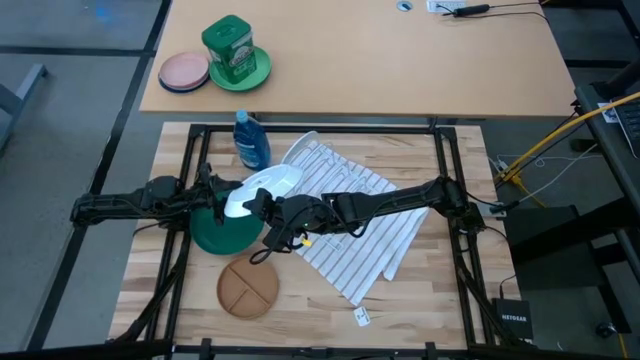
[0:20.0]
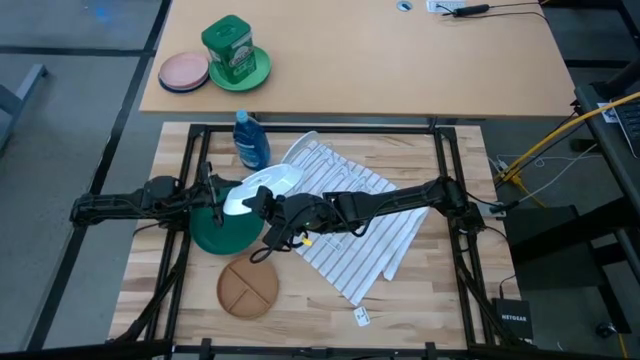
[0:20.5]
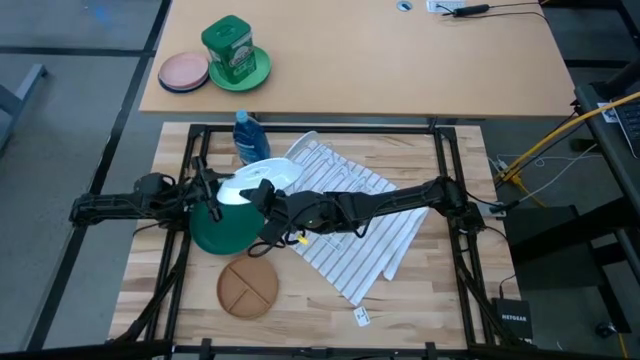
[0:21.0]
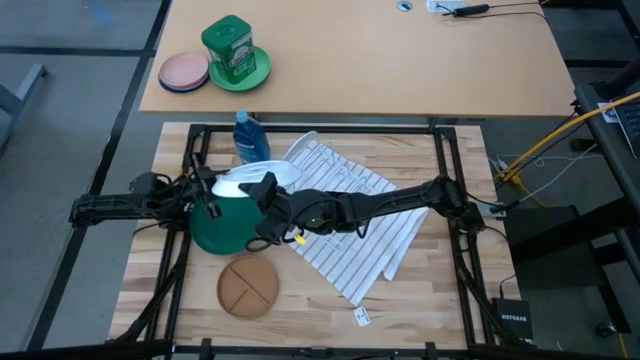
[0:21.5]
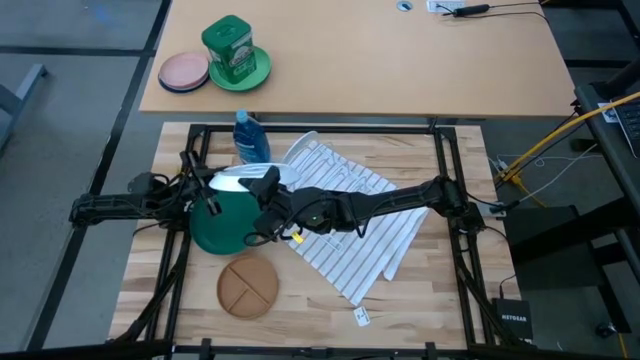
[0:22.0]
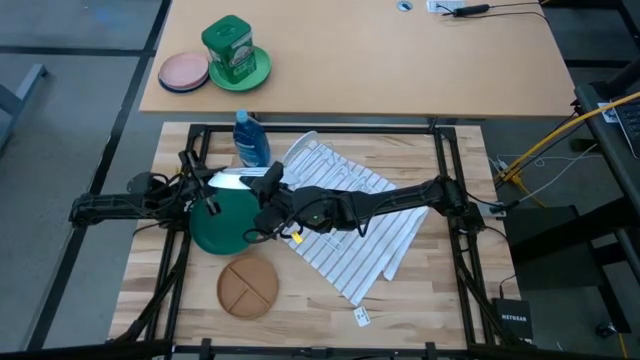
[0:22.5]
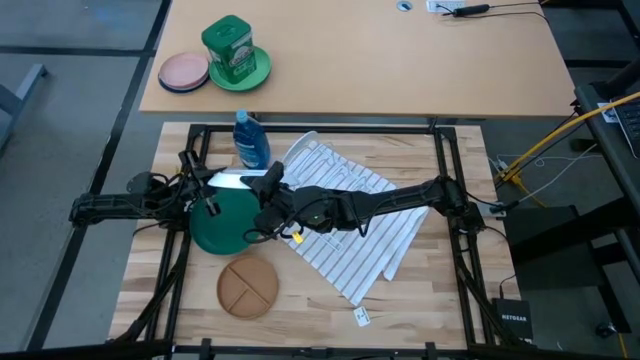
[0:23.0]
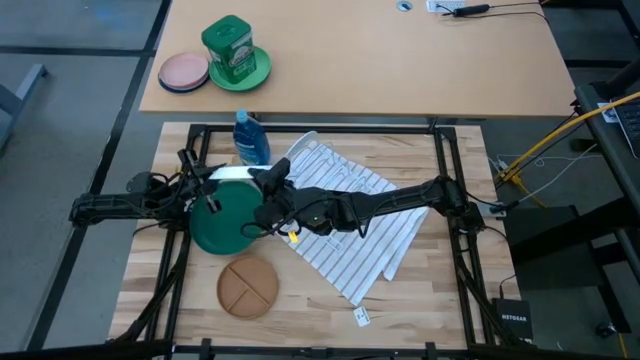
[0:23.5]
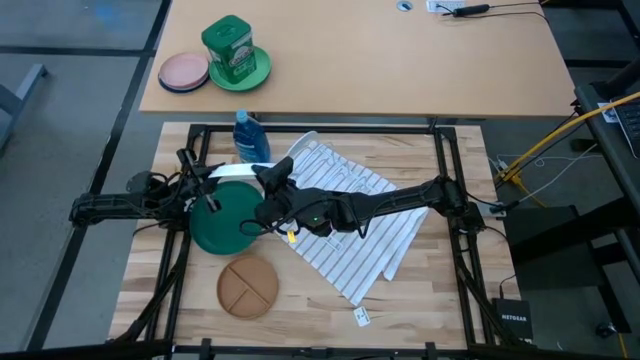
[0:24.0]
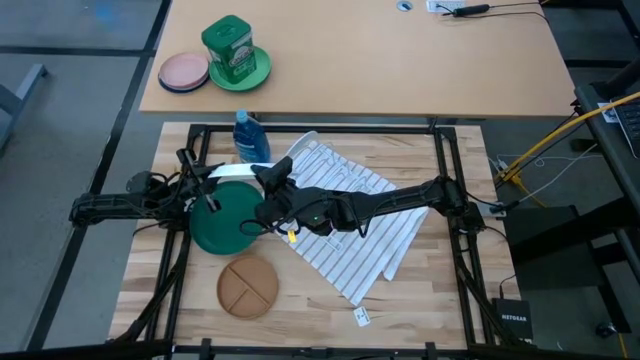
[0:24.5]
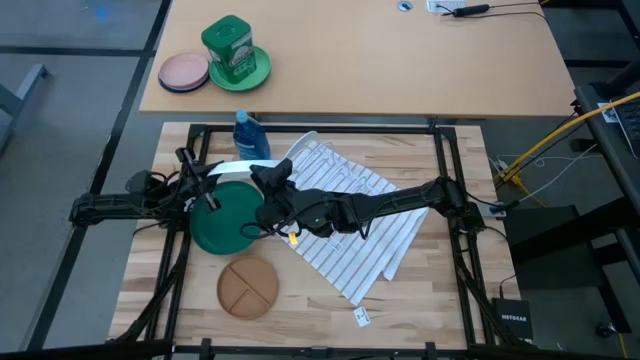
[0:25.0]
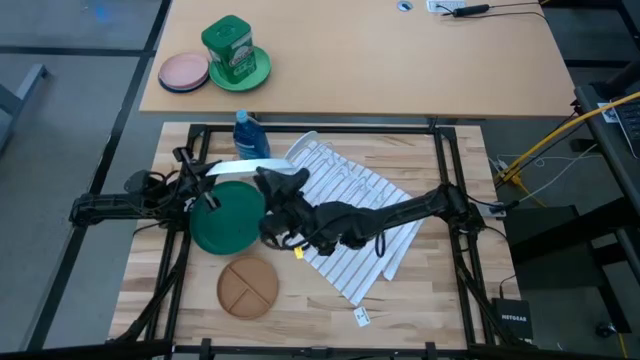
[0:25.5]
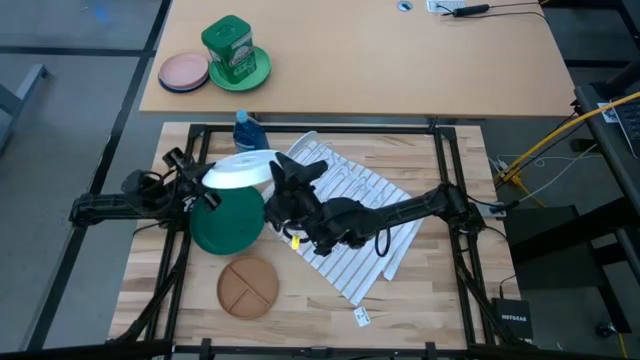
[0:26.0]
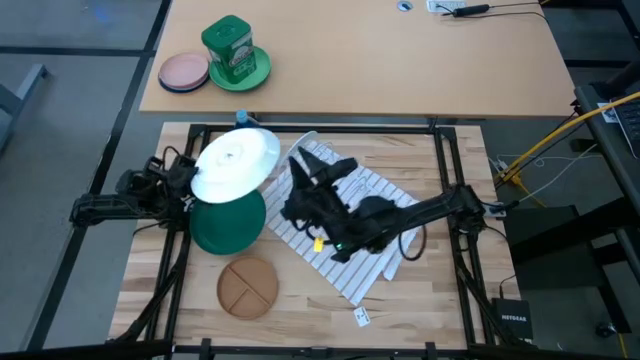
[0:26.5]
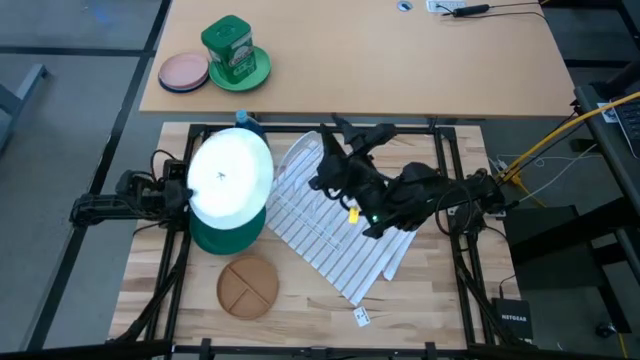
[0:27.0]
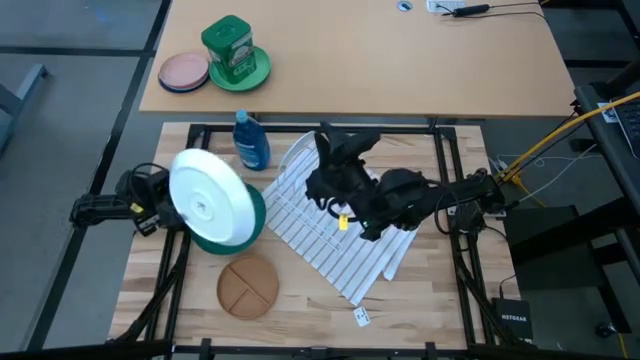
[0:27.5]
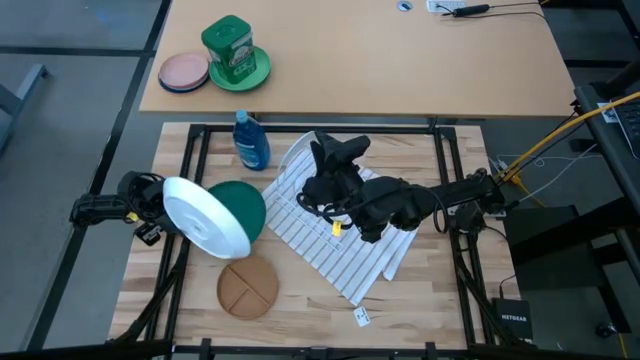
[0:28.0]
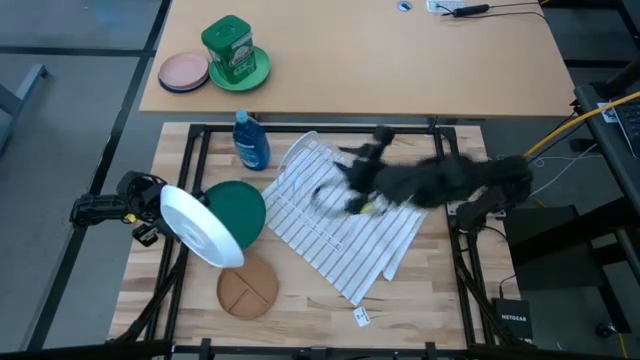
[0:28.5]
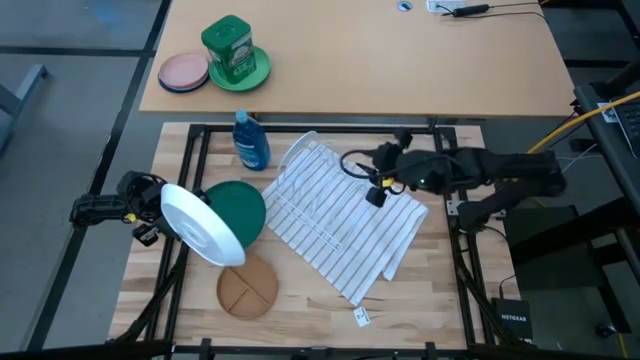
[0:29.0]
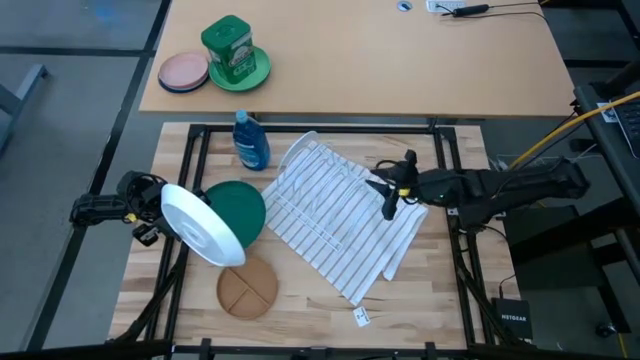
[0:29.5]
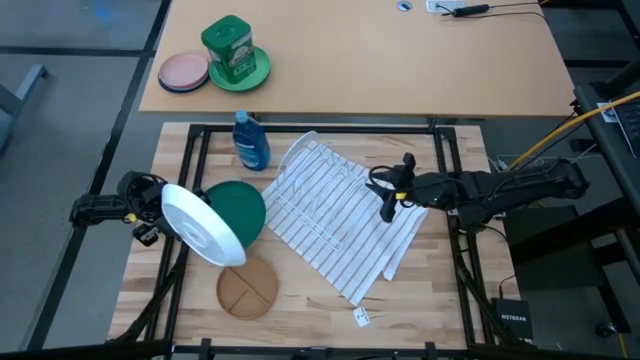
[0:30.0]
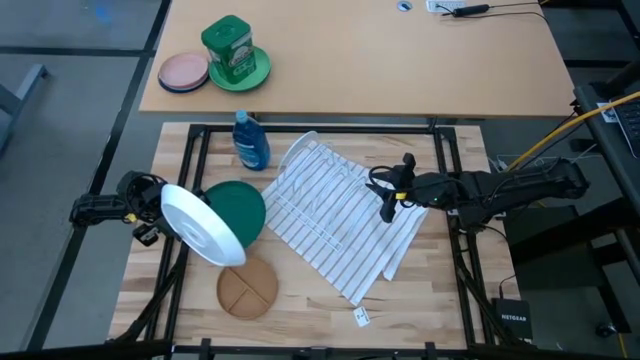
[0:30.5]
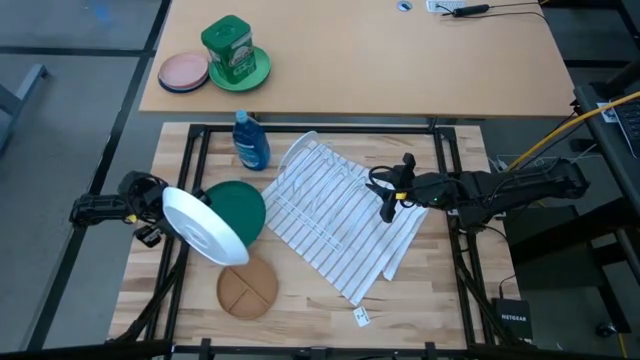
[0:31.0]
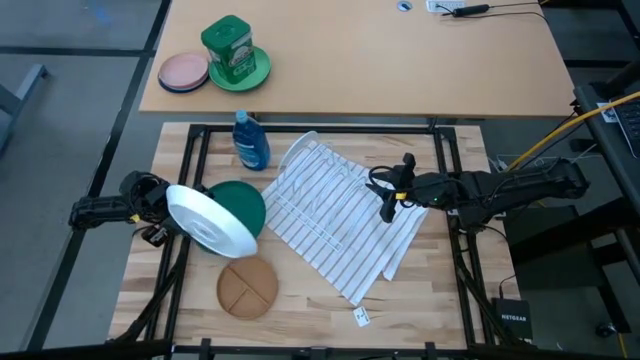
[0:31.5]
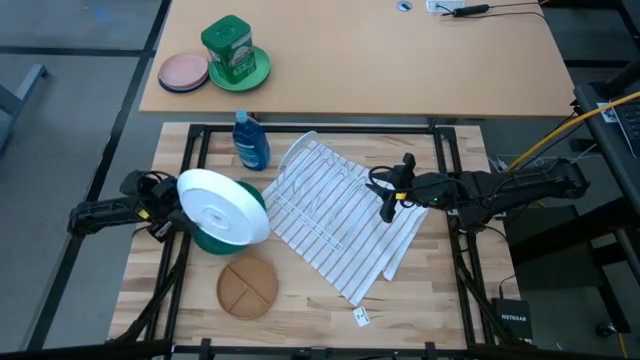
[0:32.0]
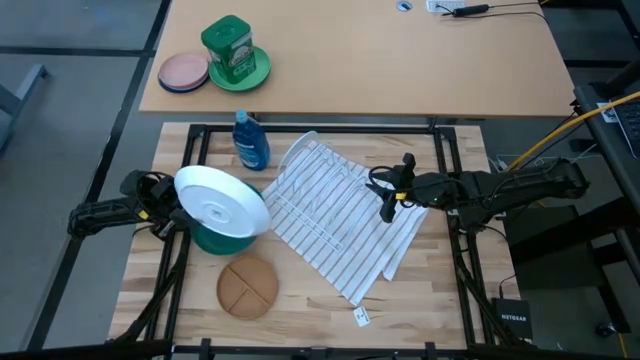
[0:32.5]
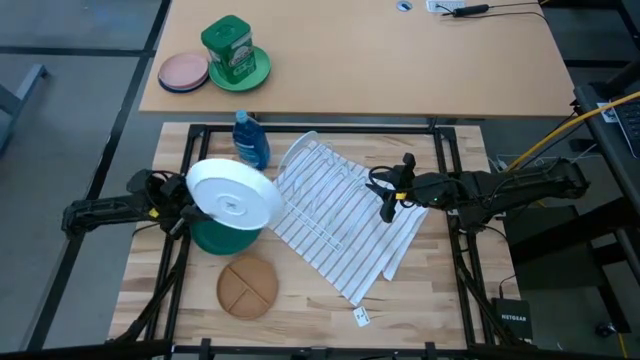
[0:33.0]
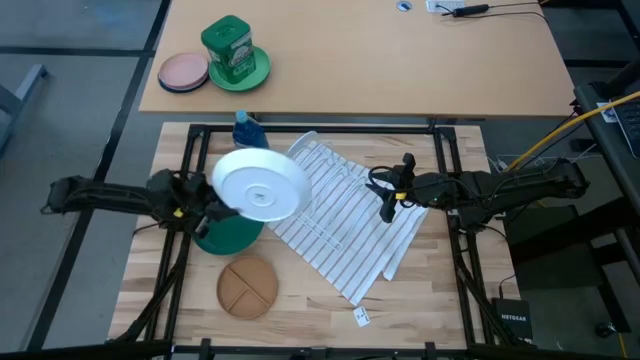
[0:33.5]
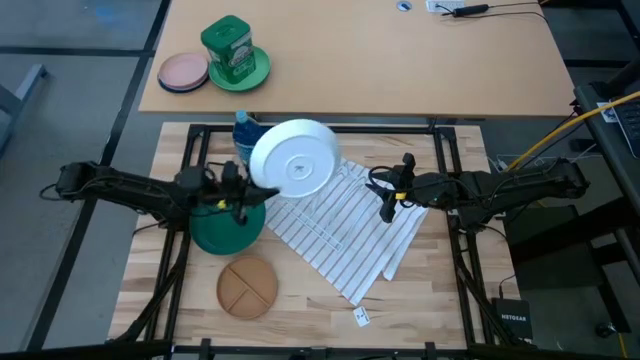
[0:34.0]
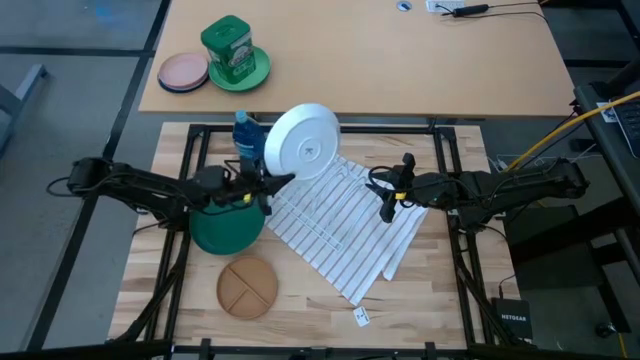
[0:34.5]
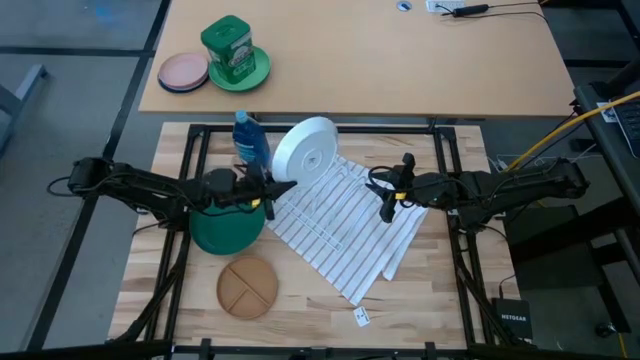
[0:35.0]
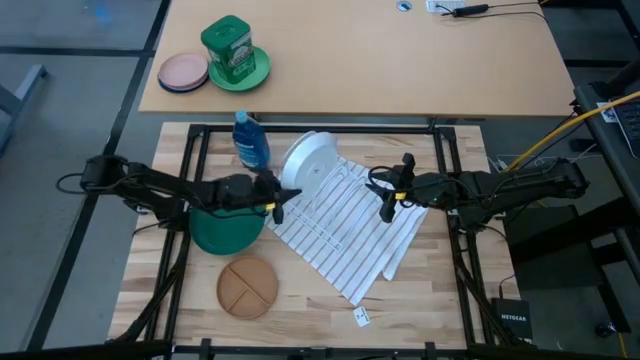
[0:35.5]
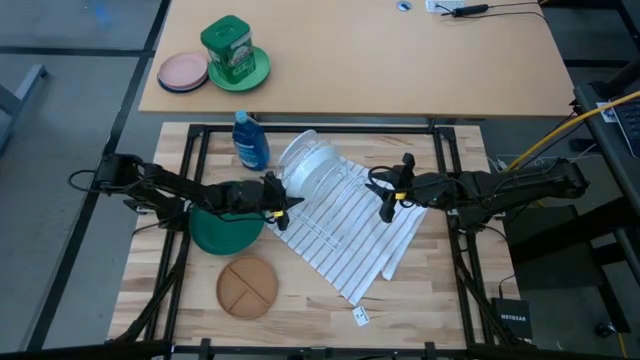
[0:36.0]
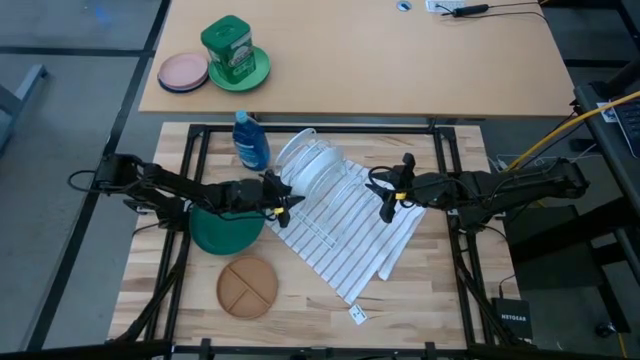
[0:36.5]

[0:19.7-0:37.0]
Task: Sort dishes
Put the white plate into the white dish rack
